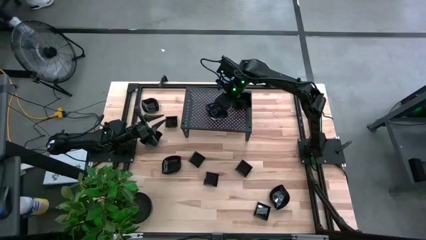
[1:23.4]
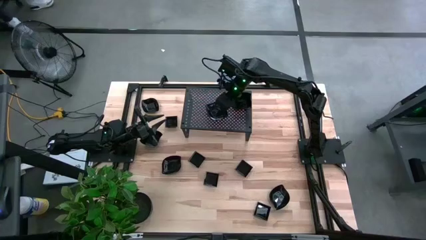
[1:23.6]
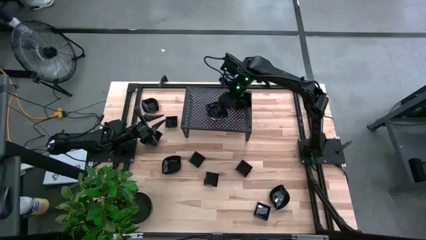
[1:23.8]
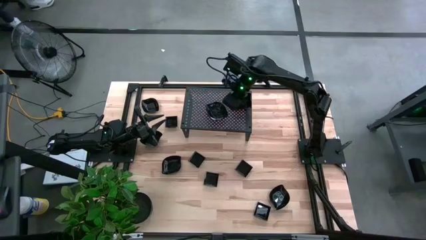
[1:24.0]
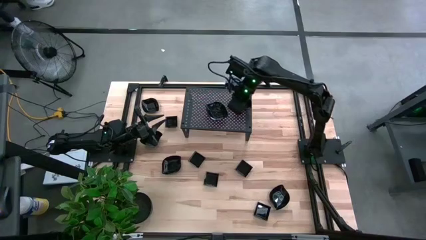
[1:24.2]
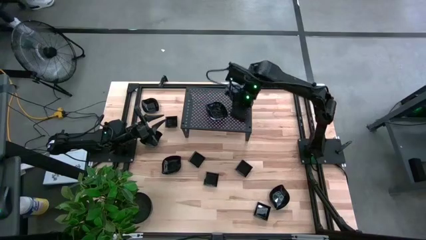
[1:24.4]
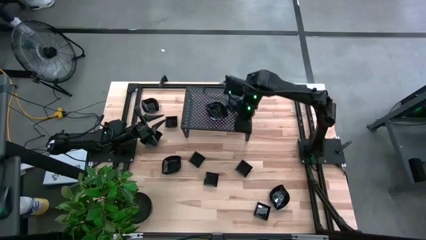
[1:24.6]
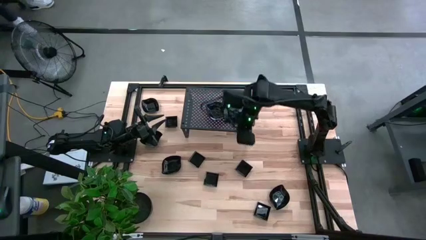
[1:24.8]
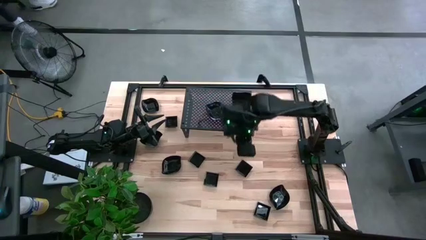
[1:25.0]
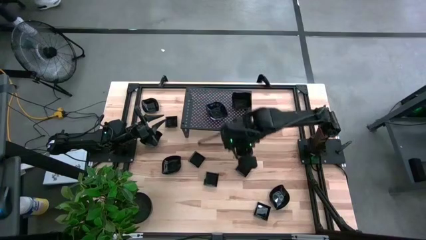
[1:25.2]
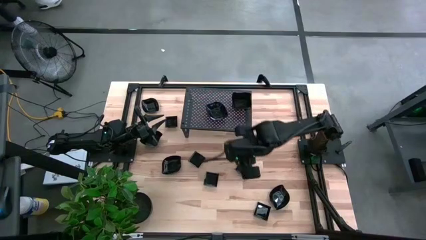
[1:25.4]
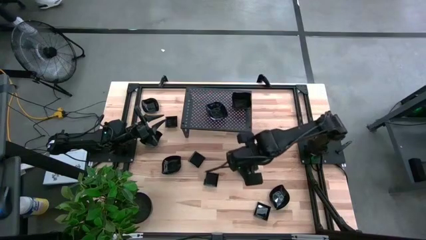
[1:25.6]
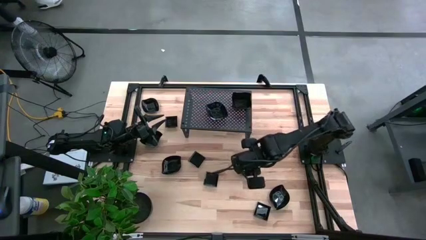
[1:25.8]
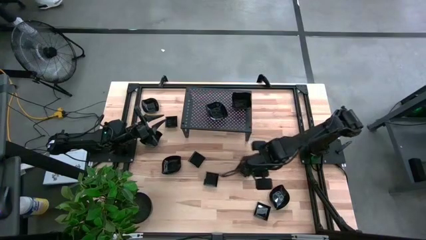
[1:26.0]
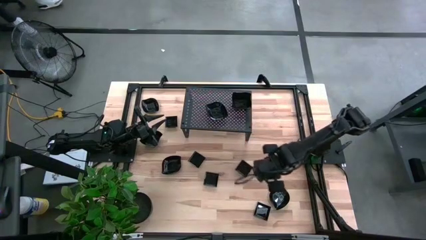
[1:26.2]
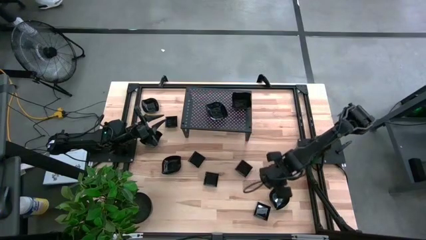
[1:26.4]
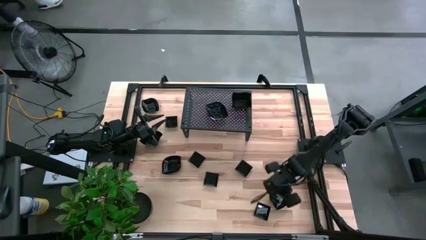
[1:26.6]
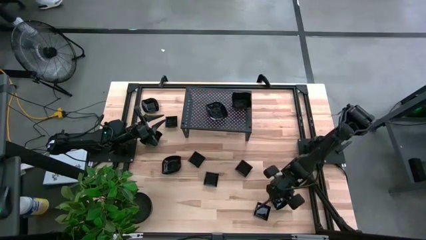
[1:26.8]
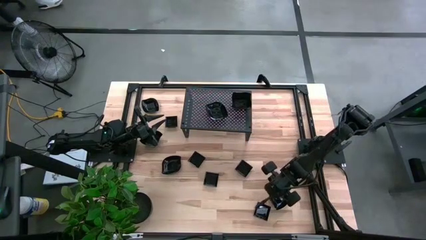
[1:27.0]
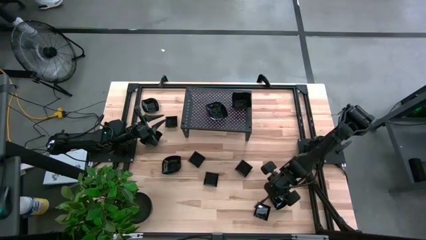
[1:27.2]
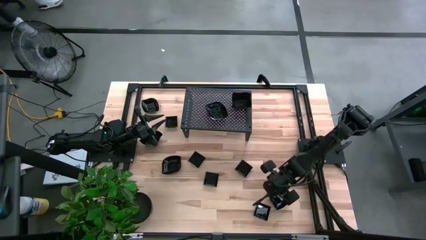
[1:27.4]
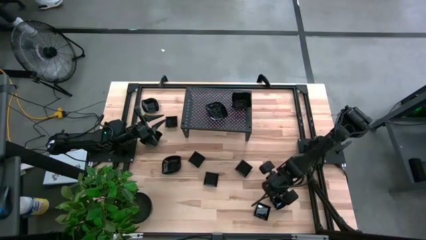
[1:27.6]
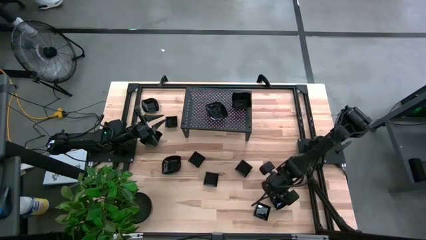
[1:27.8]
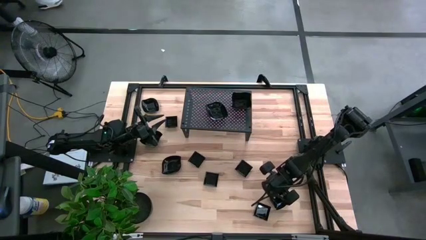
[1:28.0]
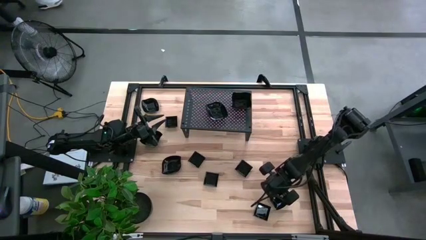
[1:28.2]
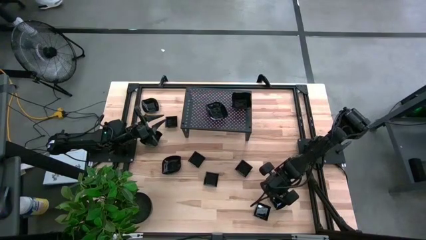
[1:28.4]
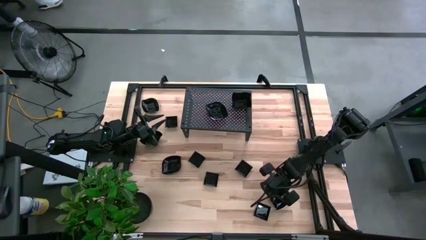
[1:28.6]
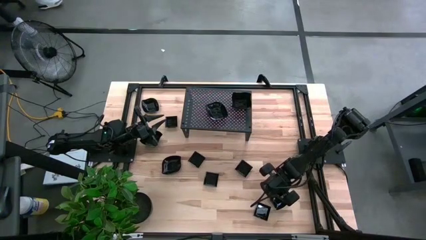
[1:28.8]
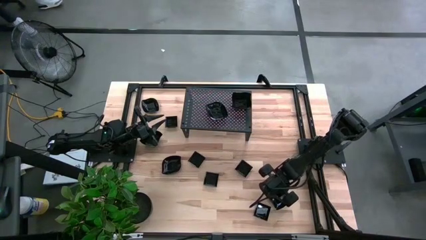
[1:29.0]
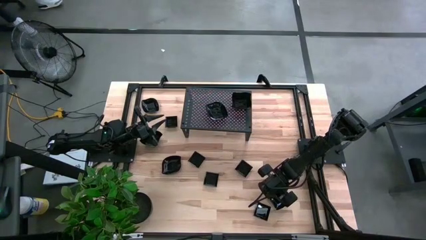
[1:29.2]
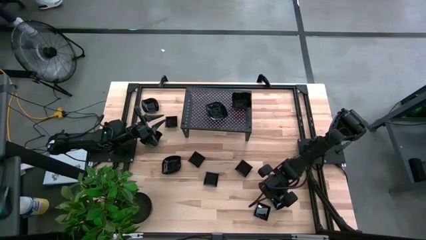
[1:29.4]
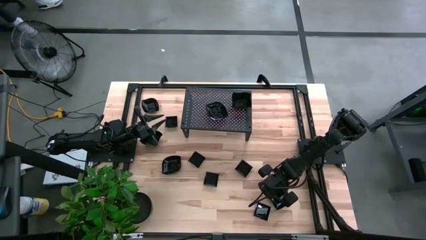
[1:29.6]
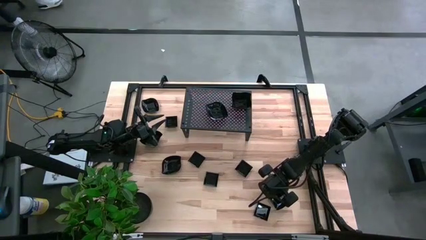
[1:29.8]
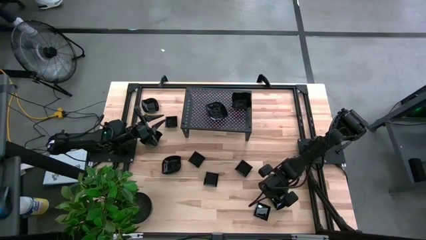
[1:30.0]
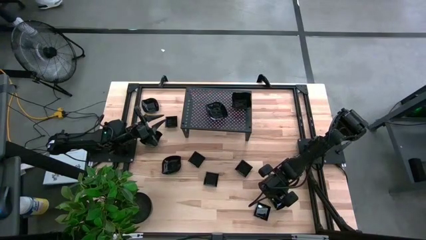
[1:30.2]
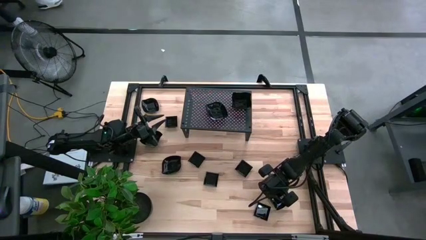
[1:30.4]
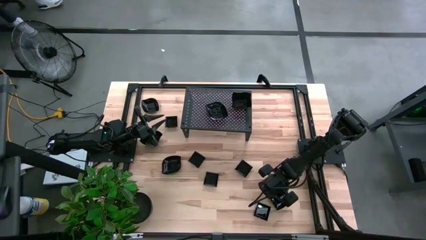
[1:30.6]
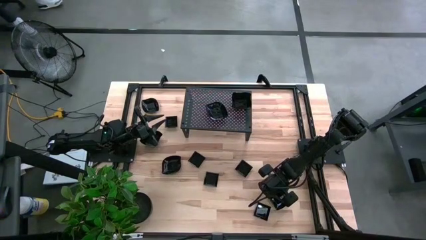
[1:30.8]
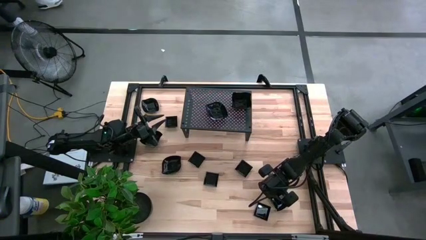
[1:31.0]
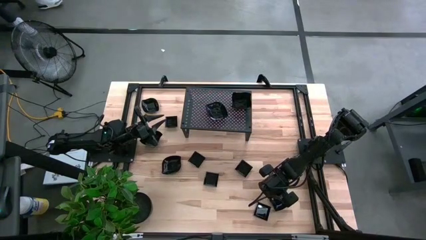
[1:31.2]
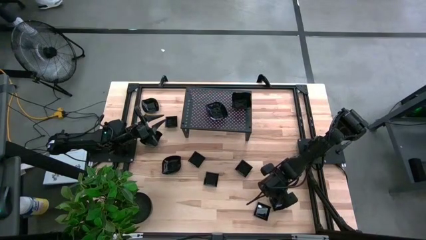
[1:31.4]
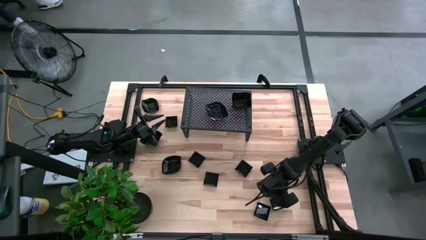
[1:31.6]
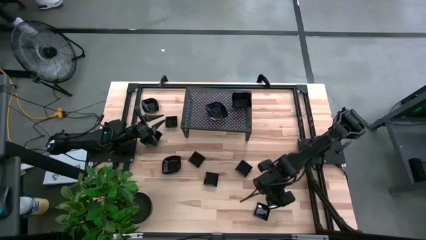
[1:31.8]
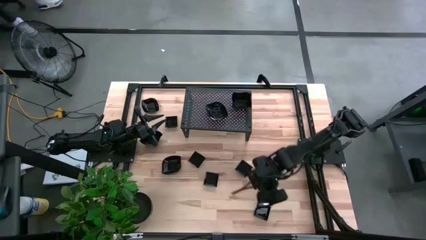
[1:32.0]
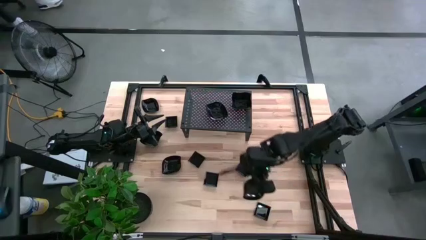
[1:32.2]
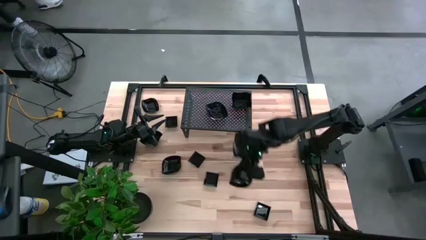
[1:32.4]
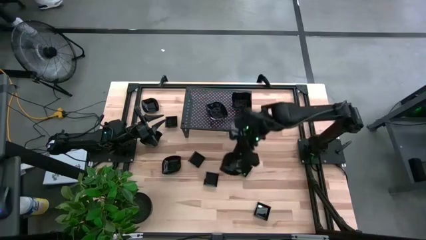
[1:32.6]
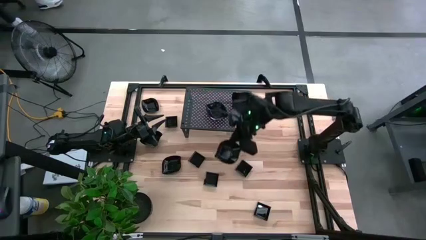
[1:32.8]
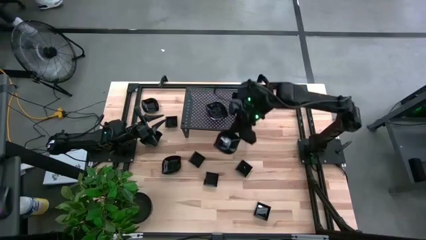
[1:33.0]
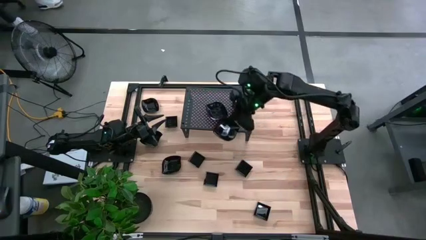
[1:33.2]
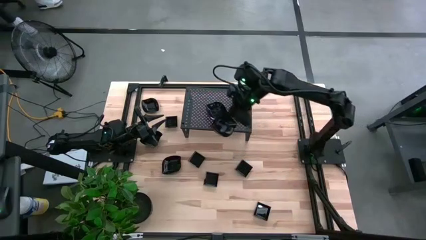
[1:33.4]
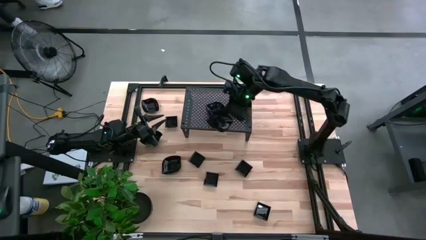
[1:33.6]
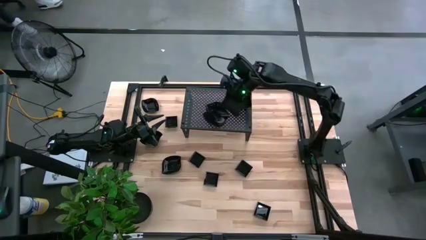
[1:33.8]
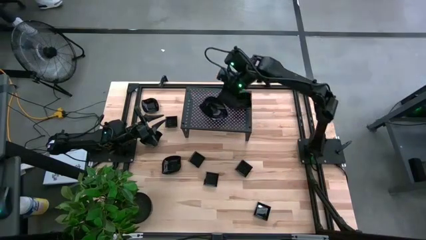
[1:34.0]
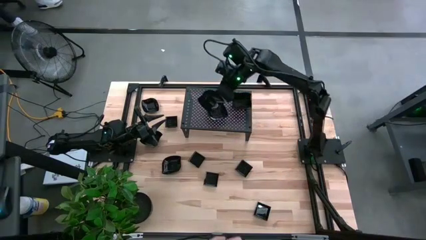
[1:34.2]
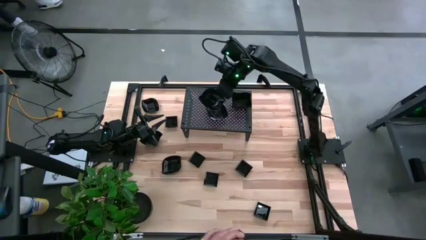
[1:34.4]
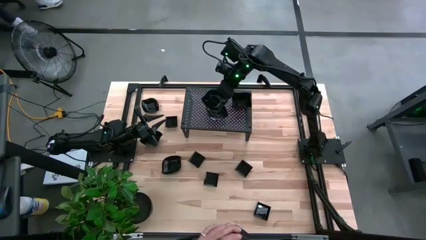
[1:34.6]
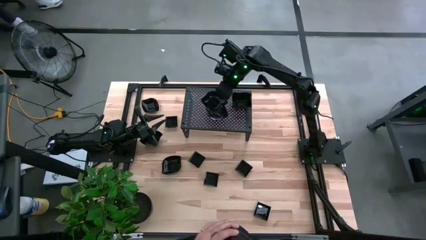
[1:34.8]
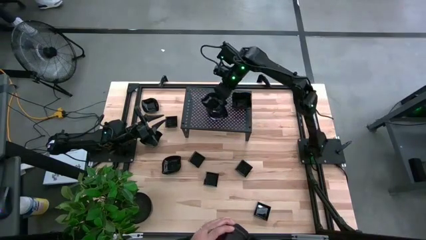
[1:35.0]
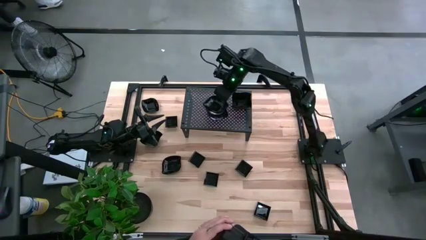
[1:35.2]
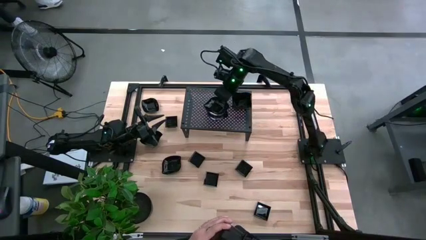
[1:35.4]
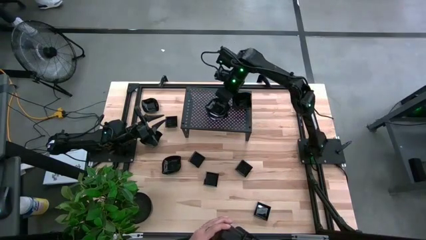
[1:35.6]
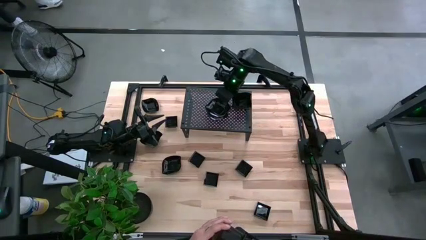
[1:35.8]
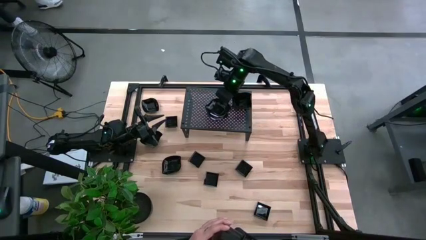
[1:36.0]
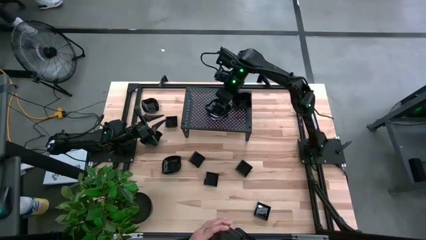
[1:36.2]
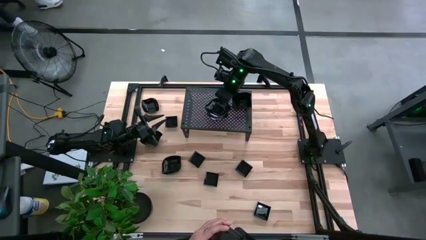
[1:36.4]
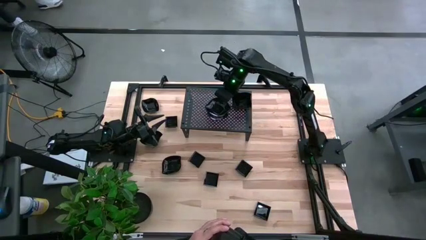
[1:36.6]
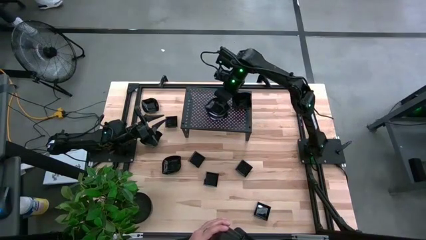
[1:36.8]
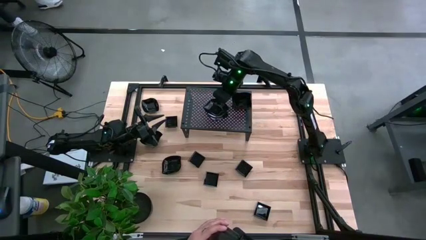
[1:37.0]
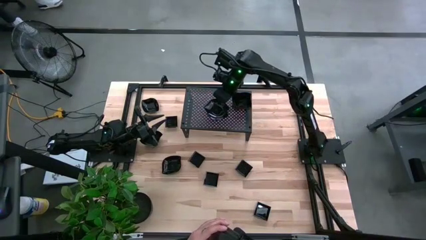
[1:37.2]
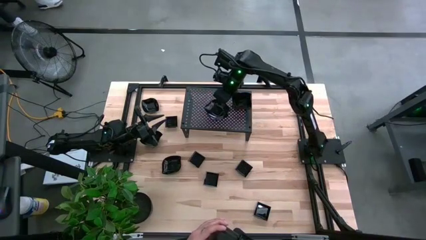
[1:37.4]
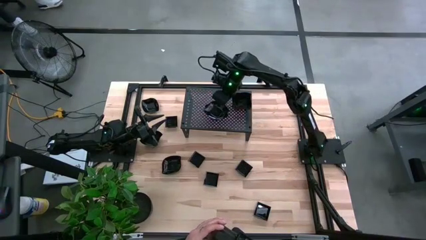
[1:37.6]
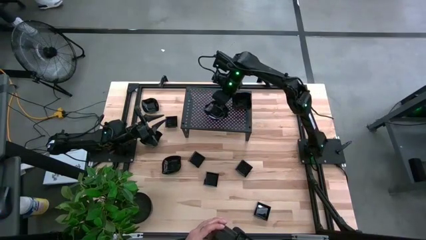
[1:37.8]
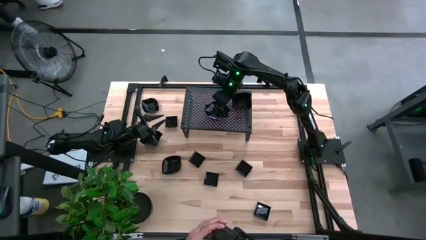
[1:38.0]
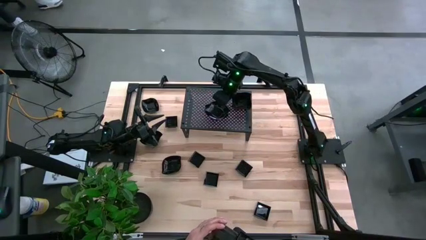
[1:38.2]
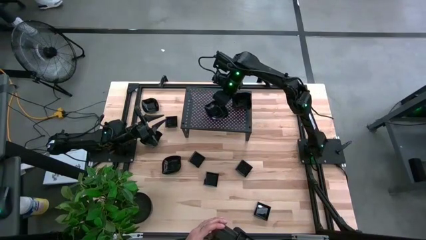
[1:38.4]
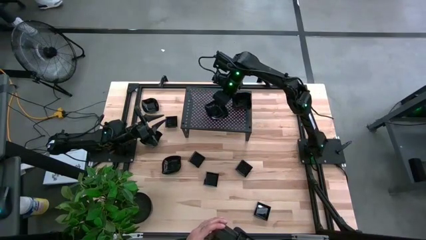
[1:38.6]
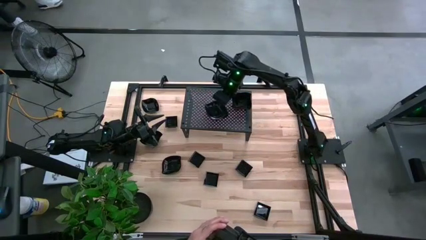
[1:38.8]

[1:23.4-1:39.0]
Task: Pick & Place Mini shaped plates
Stack the leaf-shaped plate on the leaf-shaped plates on the shelf
